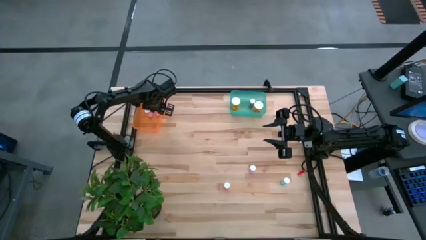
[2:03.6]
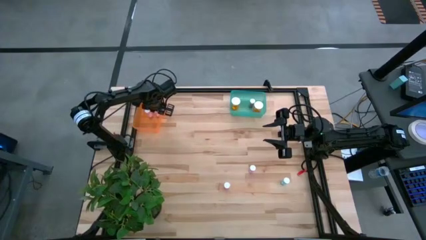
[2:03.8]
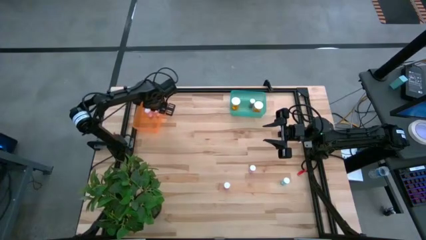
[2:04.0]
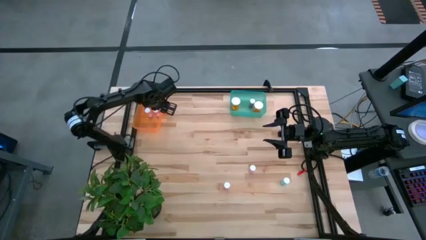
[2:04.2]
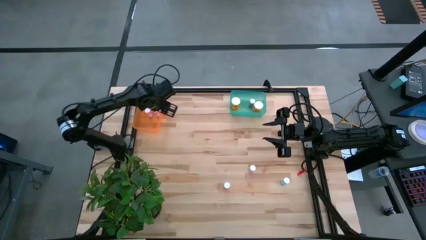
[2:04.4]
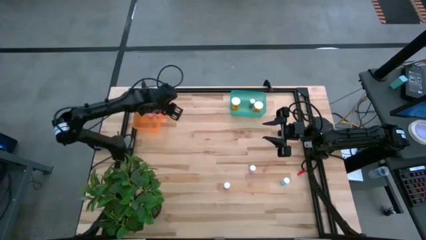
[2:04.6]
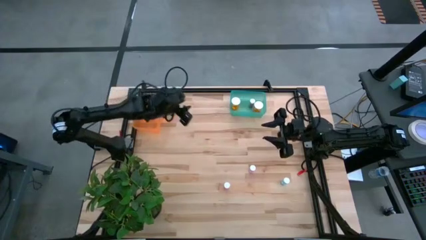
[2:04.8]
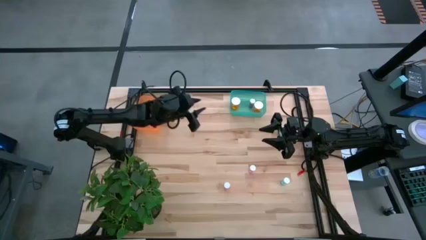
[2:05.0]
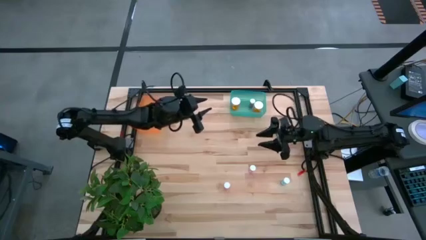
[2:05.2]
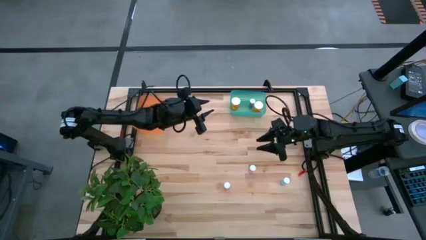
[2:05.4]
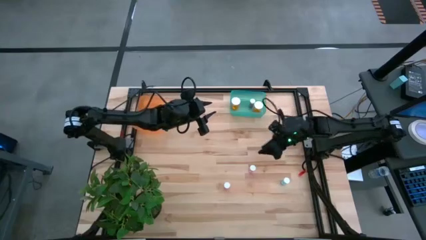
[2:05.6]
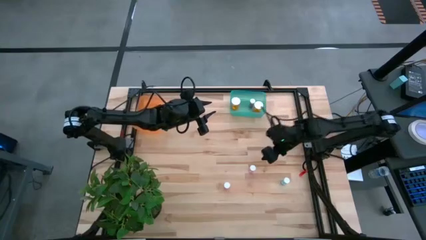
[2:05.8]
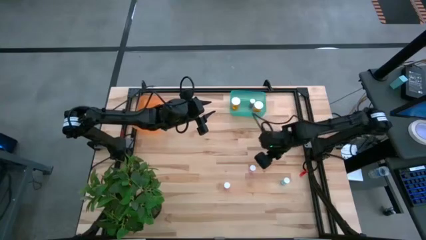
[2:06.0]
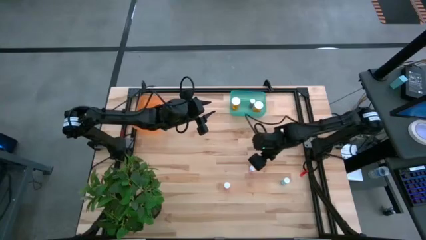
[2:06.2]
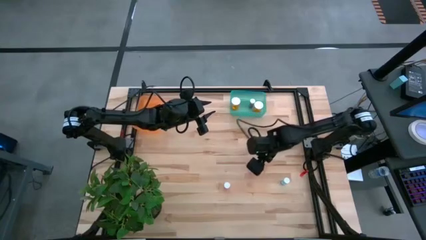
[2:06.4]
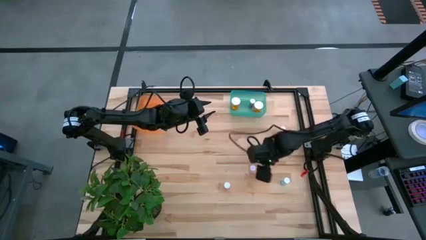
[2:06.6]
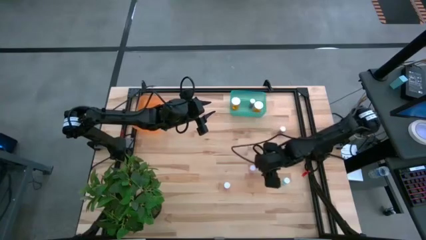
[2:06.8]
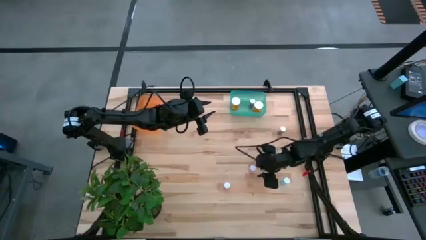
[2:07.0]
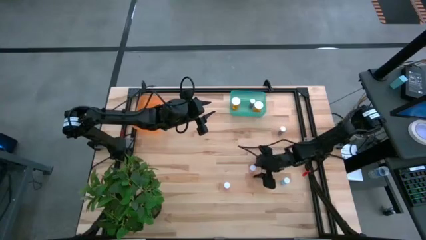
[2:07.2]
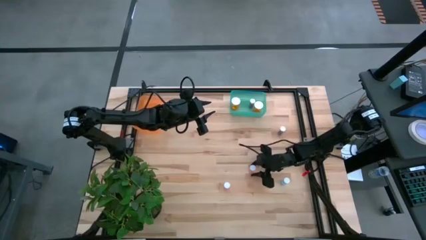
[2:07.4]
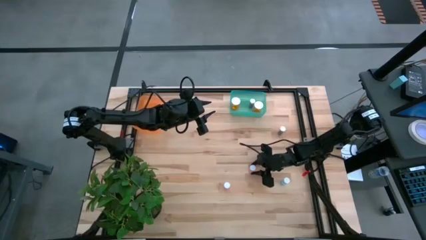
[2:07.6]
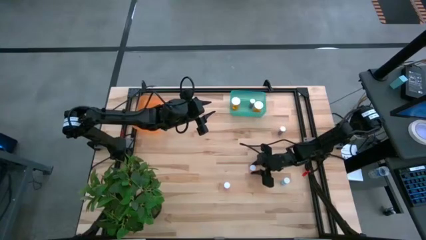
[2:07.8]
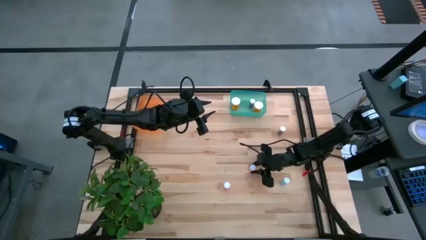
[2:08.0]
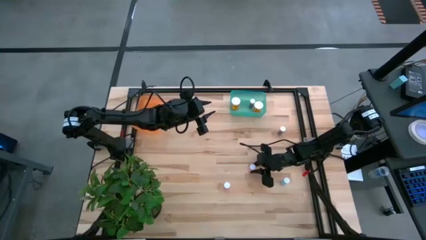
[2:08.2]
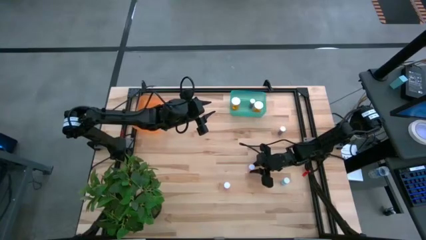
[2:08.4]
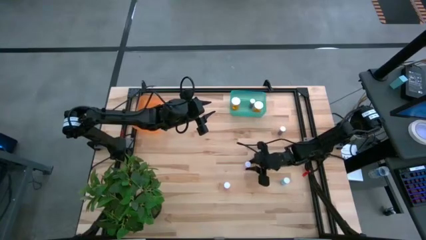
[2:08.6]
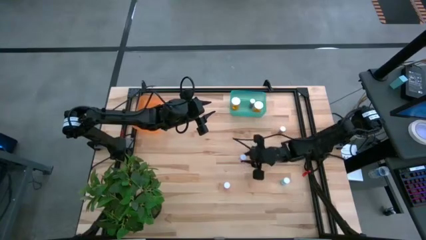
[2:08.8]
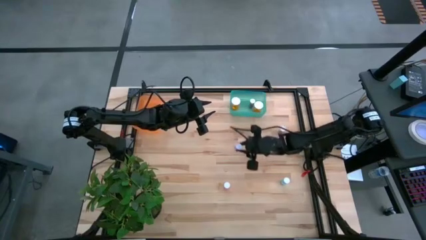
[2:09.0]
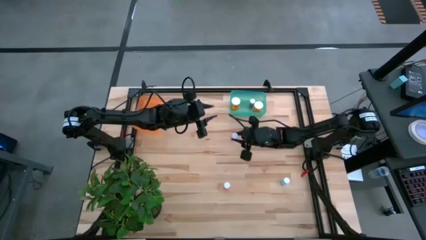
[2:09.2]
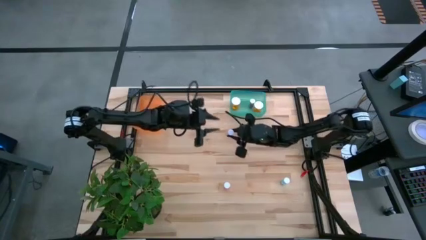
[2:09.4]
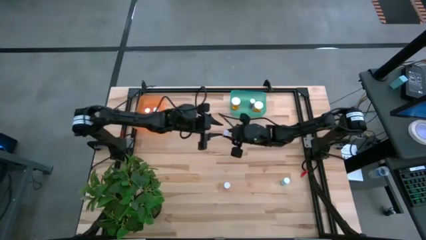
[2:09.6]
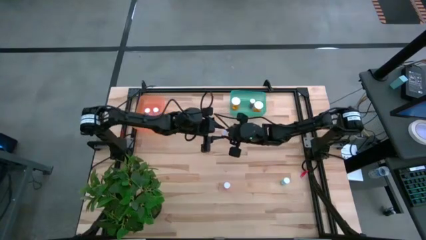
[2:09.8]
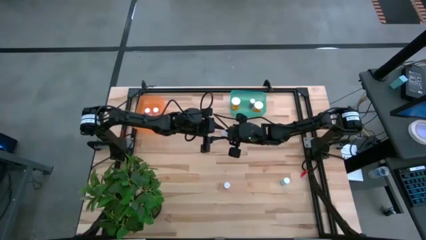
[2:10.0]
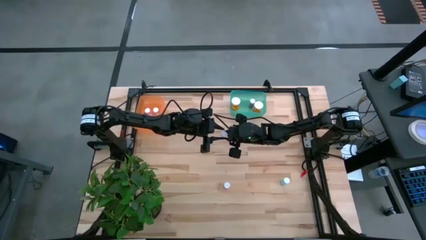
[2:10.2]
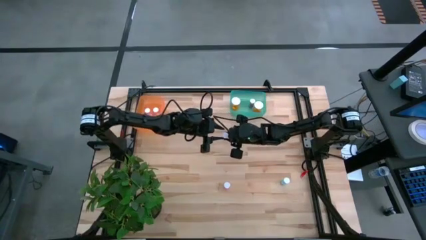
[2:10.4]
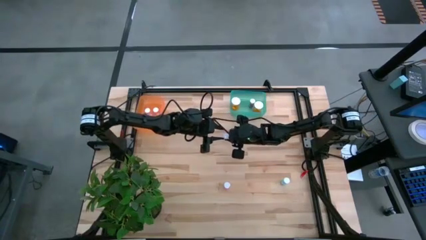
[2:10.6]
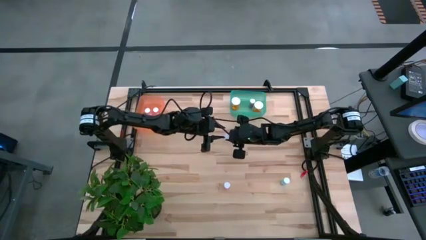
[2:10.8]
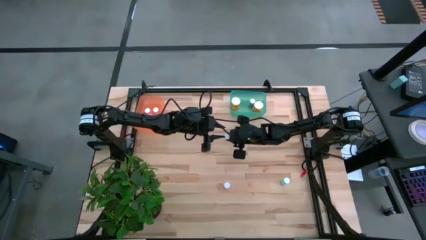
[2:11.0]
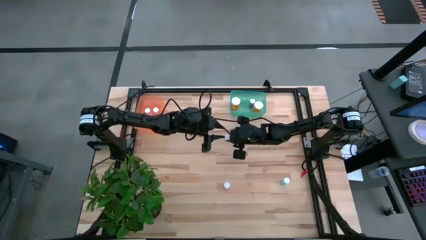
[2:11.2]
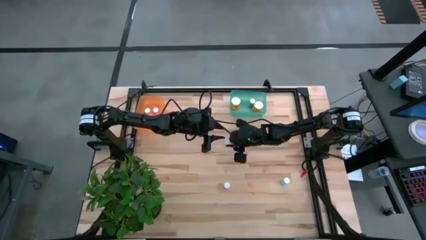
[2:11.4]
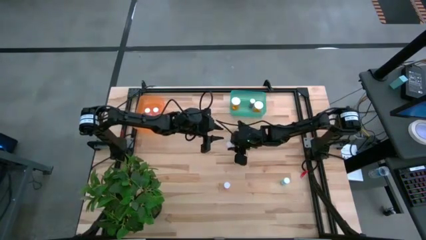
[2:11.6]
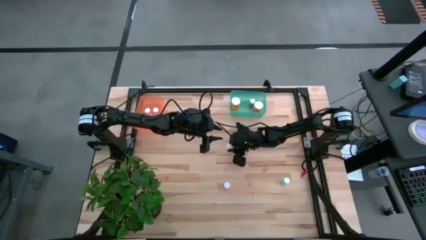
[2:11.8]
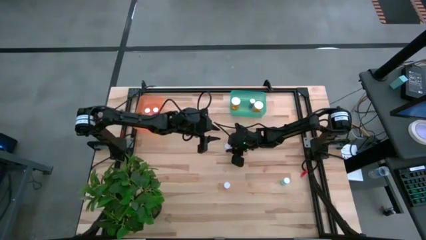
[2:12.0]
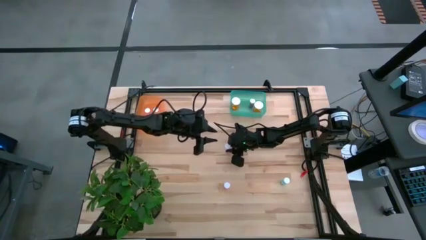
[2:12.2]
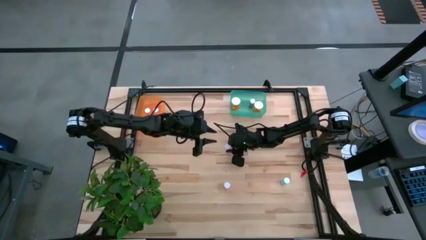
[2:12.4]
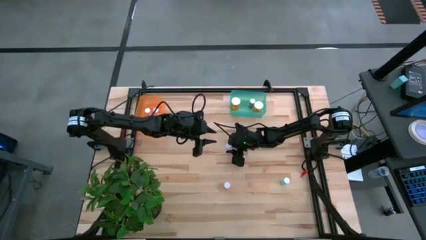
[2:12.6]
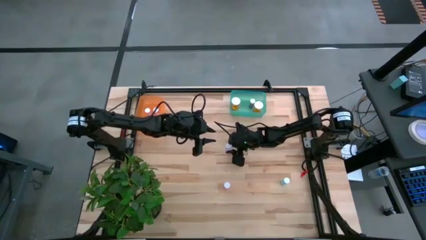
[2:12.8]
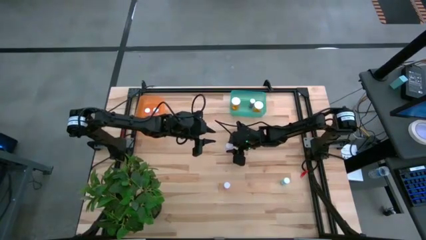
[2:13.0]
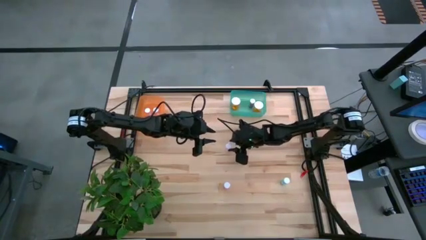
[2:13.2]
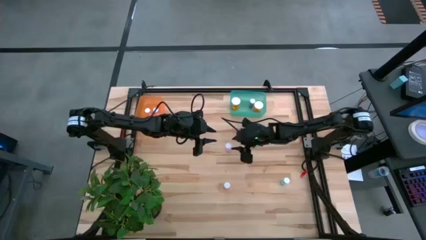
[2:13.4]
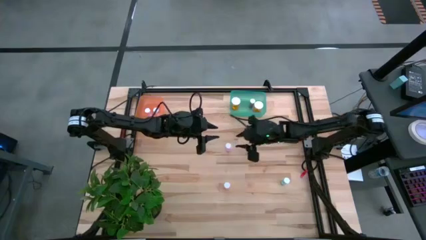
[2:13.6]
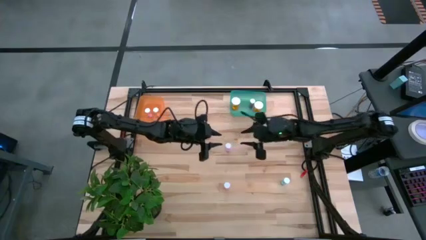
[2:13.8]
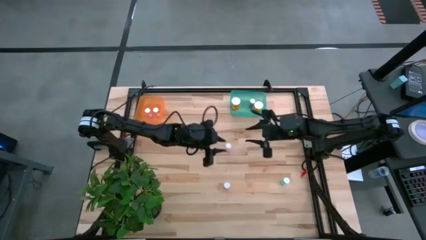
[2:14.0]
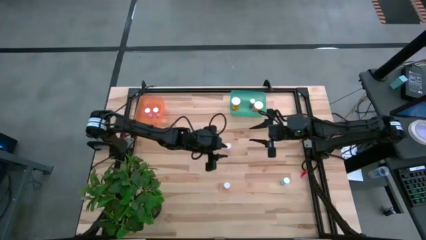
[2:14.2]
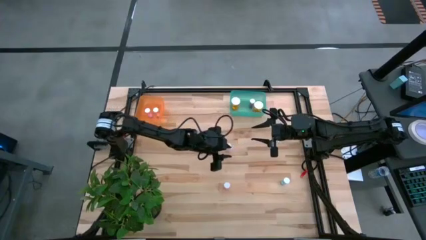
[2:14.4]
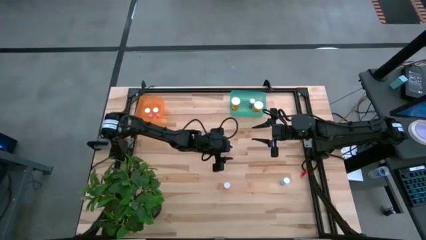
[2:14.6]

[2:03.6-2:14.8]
Task: Pick and place medicine bottles into bin by pill shape (circle, oval)
Put the pink tablet bottle into the orange bin

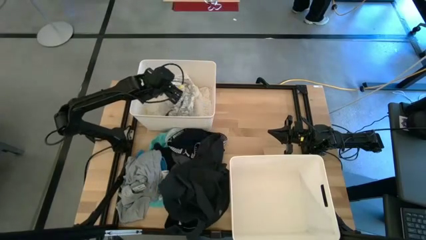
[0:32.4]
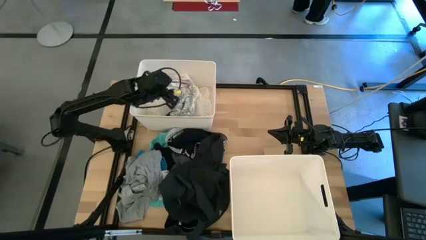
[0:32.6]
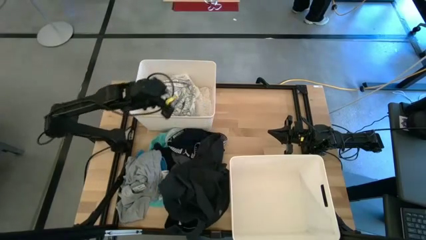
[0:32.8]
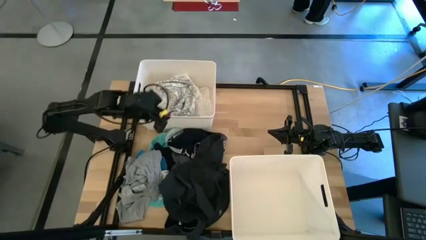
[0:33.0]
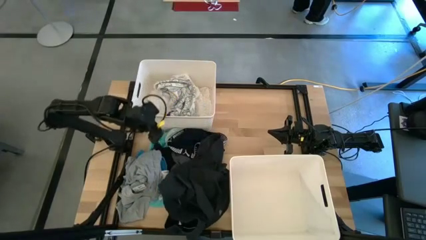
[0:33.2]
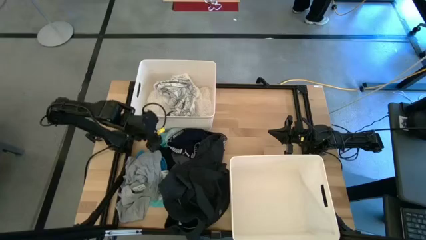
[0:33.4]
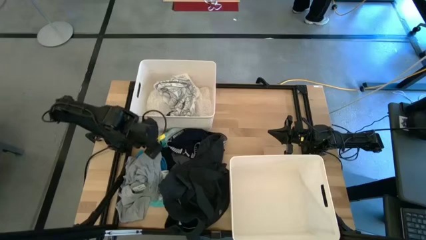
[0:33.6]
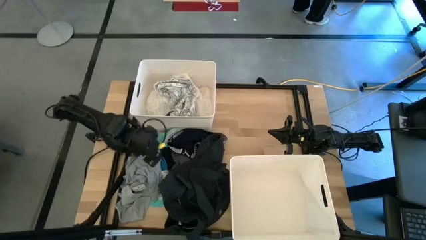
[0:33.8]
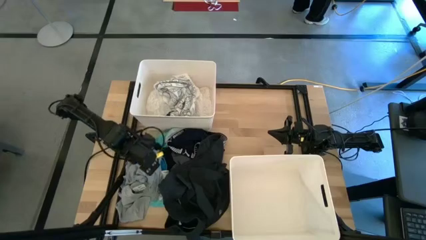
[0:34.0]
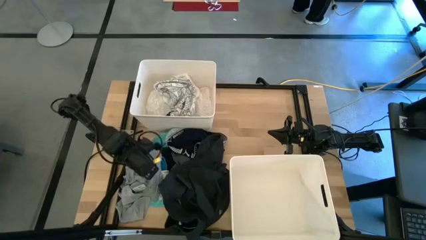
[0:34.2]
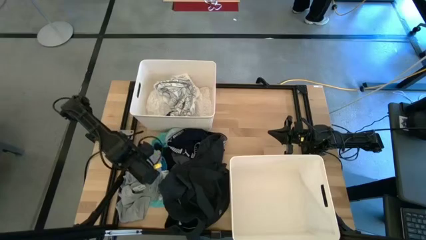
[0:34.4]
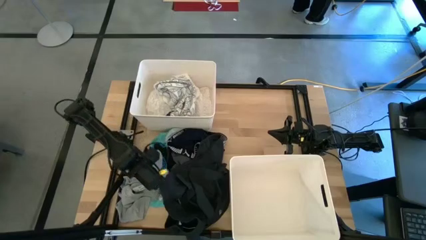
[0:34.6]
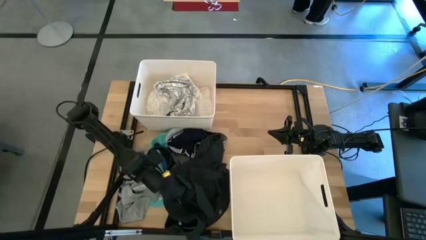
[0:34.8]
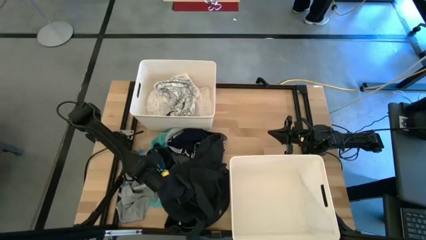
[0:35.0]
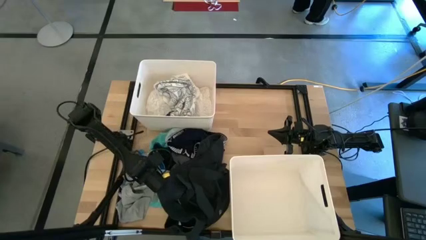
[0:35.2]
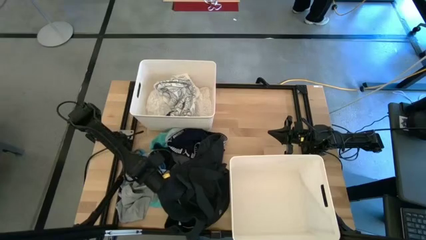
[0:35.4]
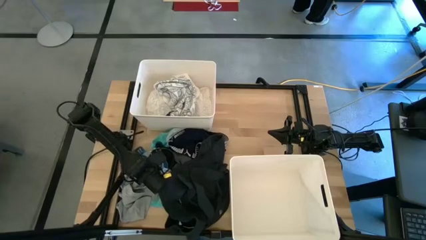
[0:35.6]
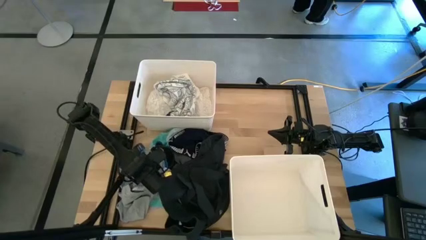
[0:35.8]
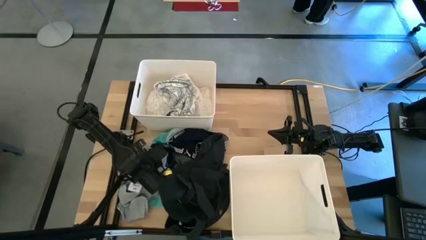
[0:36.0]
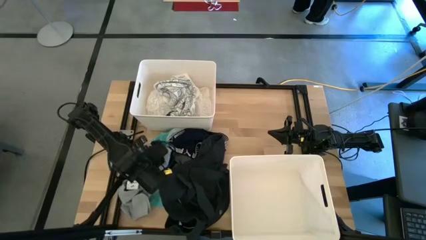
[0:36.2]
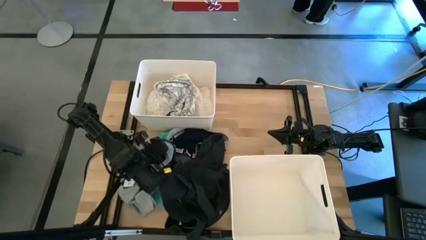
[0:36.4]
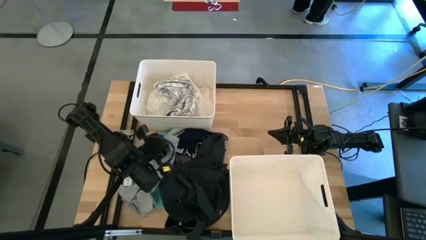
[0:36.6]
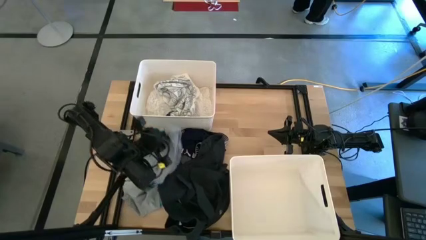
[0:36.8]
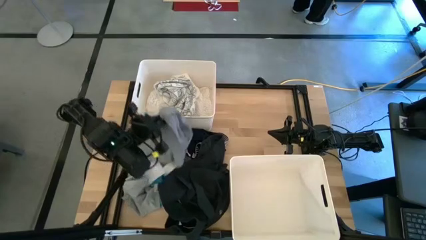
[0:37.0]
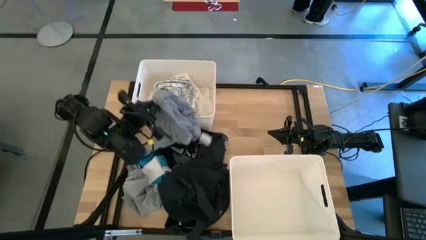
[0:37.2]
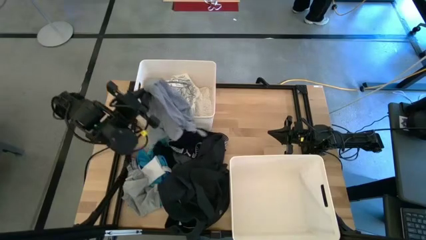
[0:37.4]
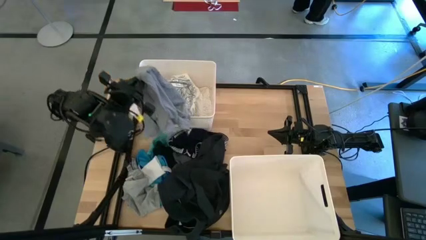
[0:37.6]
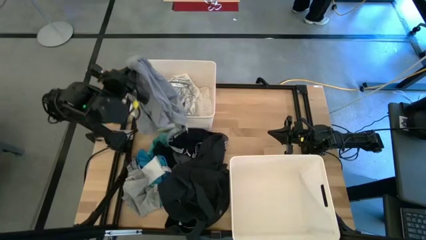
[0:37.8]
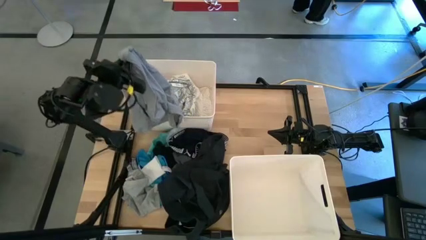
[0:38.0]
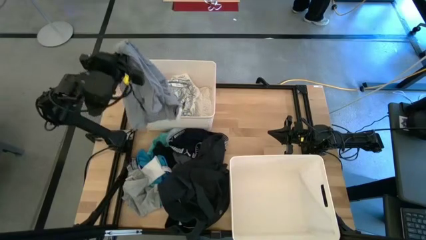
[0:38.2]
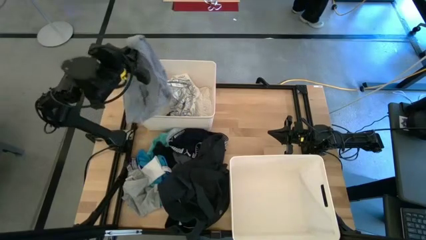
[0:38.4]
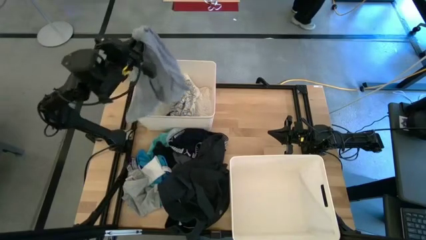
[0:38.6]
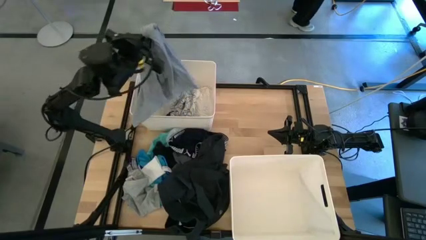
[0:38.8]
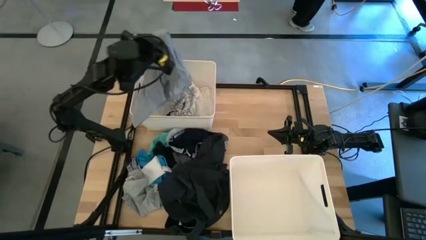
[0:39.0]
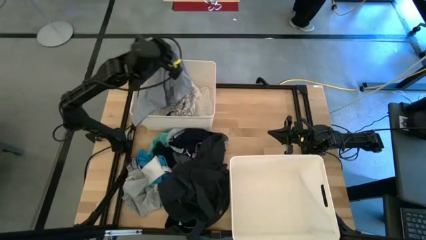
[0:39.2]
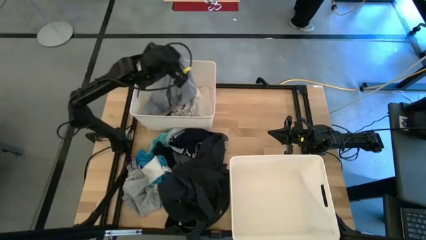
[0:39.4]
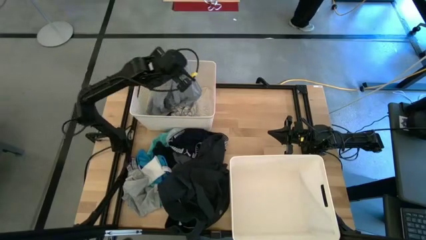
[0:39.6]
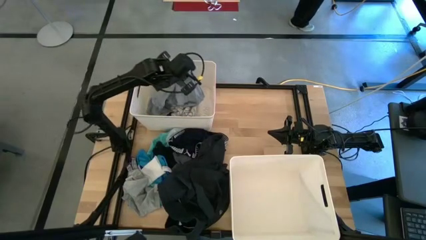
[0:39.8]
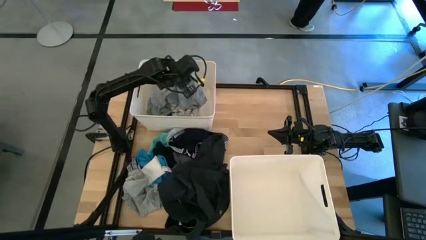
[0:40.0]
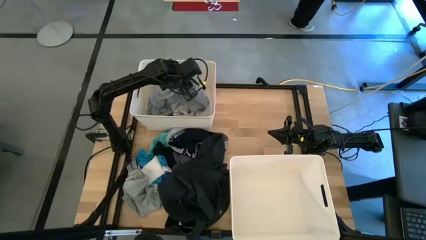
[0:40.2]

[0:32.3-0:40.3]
Task: Sort clothes
Put the gray pants into the top left laundry bin
